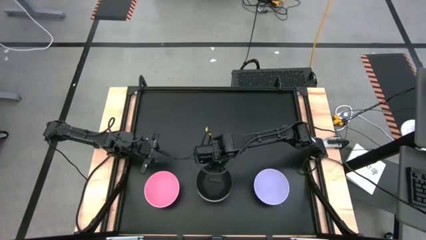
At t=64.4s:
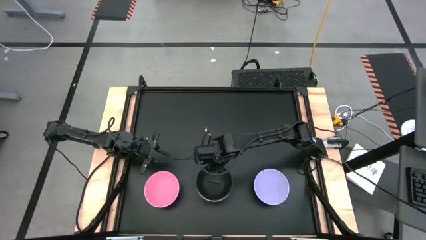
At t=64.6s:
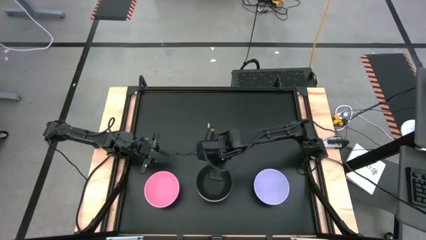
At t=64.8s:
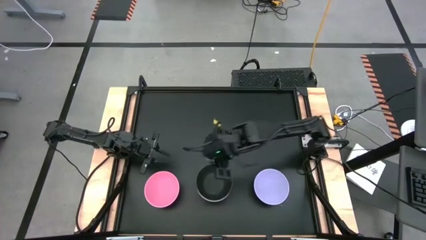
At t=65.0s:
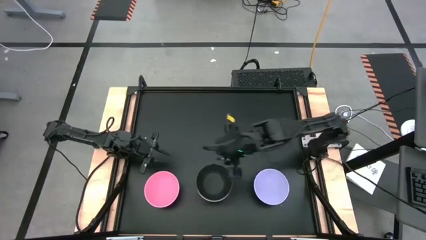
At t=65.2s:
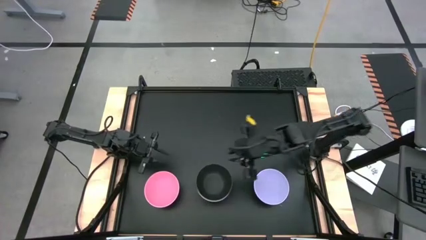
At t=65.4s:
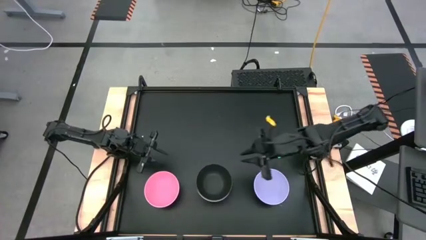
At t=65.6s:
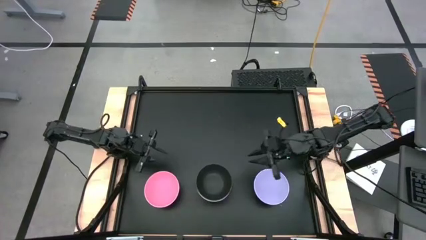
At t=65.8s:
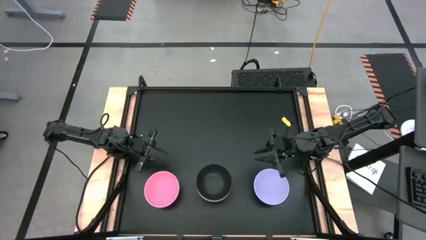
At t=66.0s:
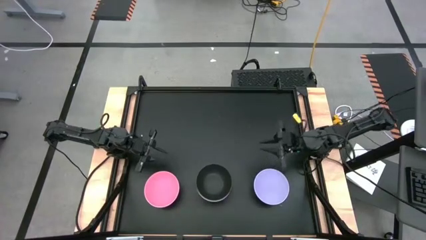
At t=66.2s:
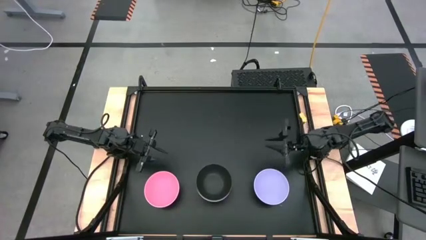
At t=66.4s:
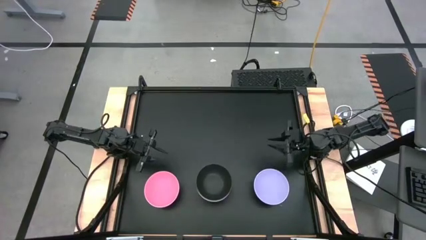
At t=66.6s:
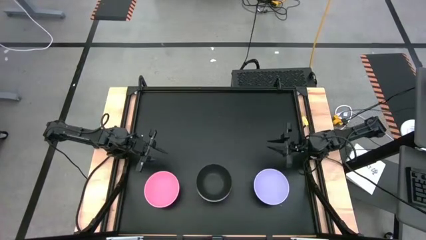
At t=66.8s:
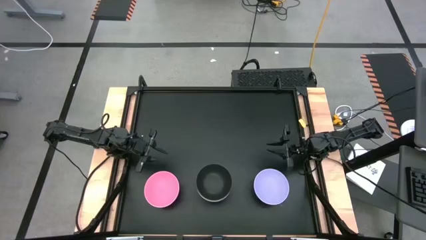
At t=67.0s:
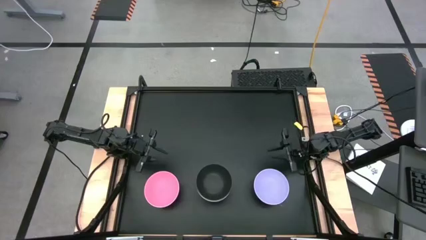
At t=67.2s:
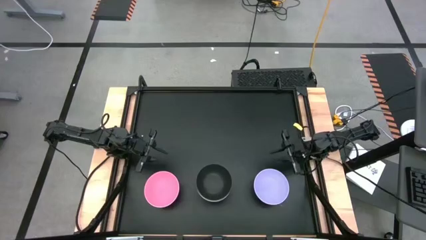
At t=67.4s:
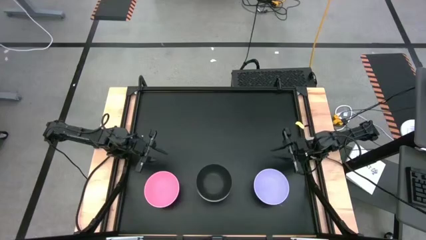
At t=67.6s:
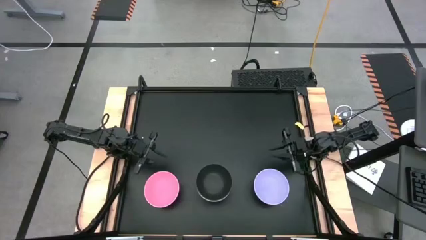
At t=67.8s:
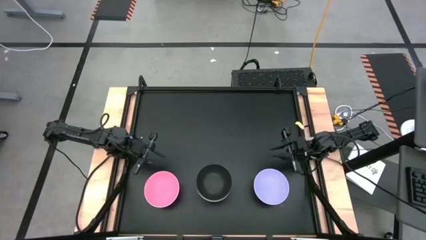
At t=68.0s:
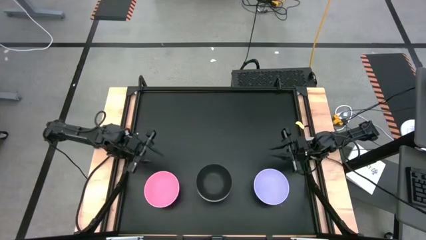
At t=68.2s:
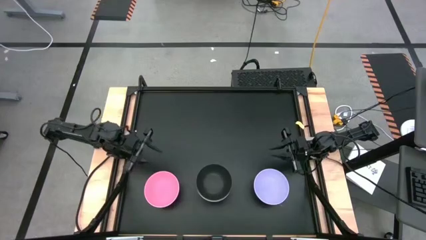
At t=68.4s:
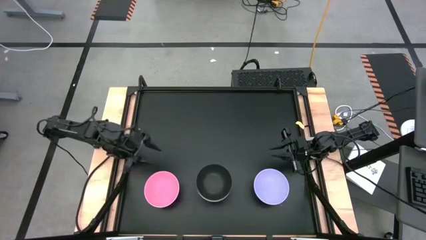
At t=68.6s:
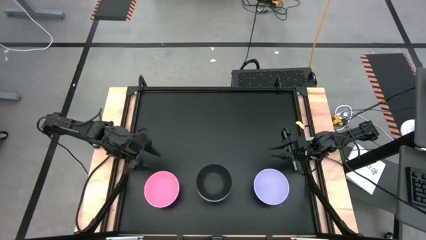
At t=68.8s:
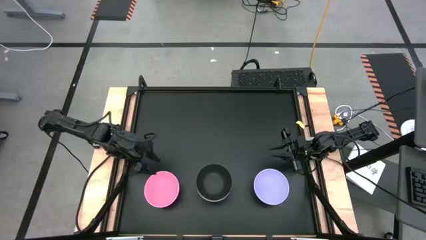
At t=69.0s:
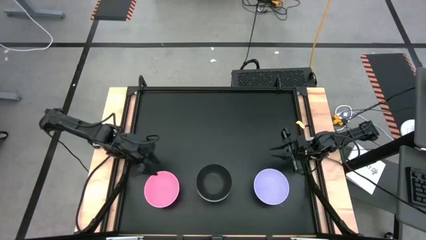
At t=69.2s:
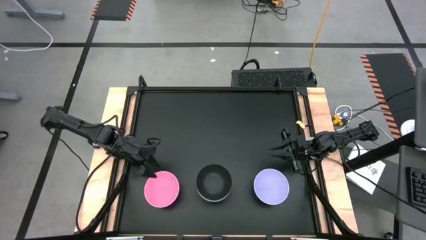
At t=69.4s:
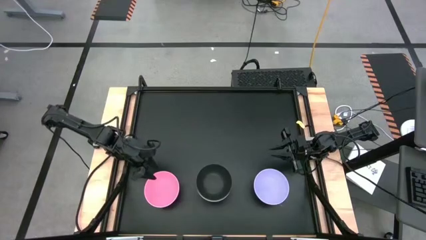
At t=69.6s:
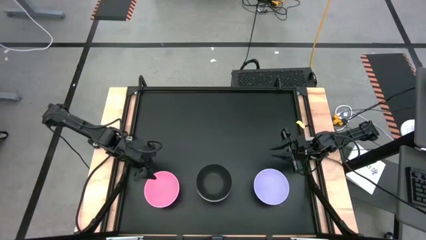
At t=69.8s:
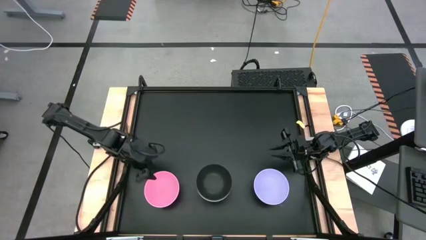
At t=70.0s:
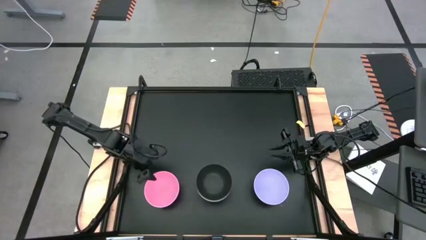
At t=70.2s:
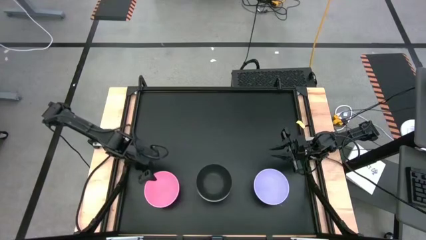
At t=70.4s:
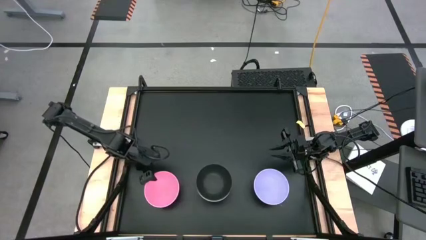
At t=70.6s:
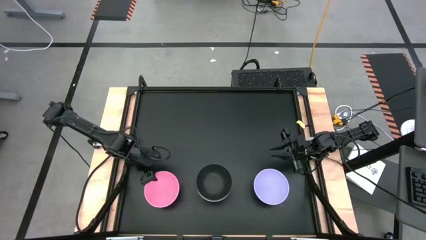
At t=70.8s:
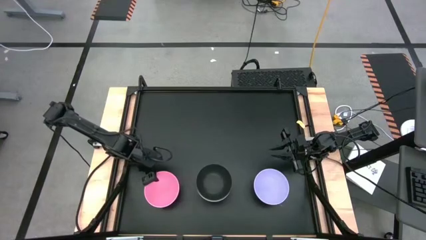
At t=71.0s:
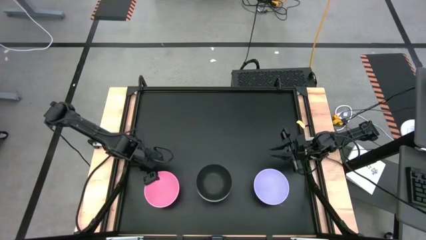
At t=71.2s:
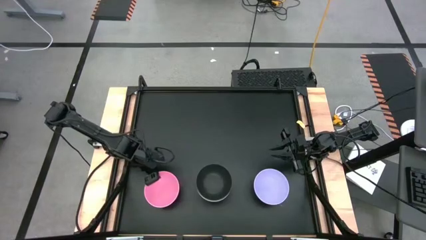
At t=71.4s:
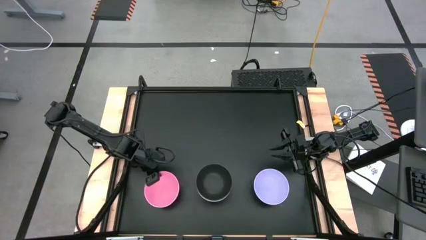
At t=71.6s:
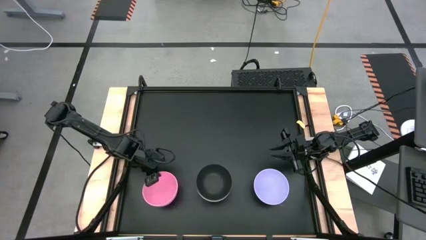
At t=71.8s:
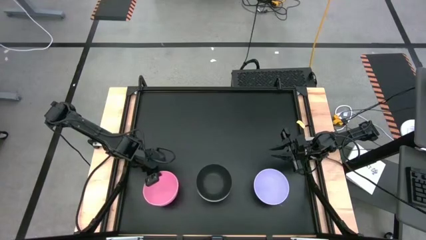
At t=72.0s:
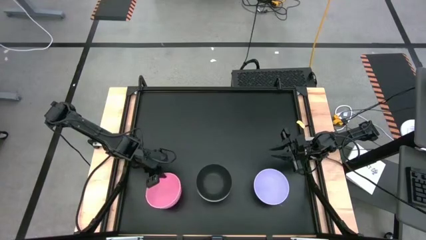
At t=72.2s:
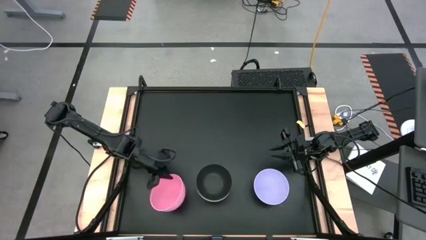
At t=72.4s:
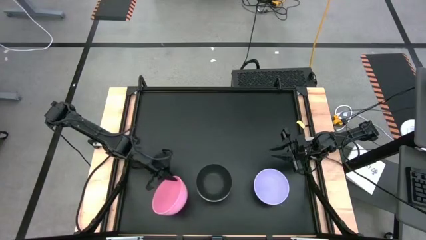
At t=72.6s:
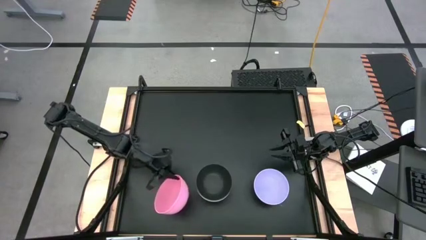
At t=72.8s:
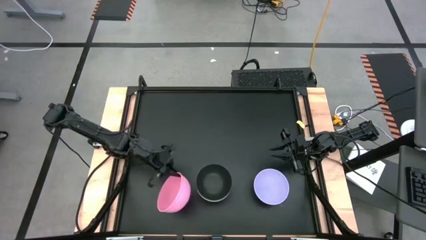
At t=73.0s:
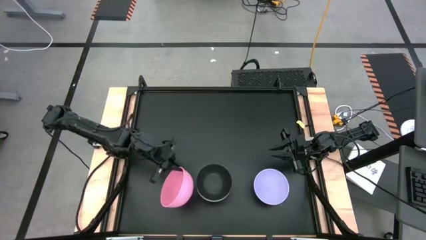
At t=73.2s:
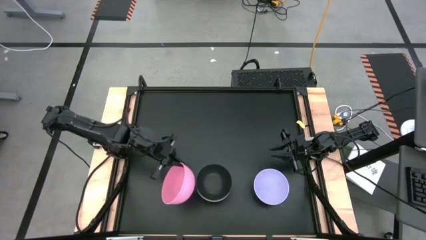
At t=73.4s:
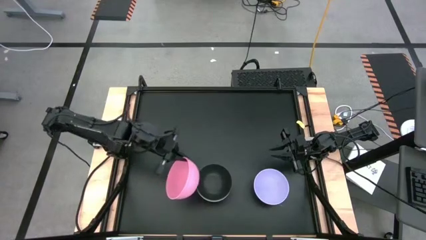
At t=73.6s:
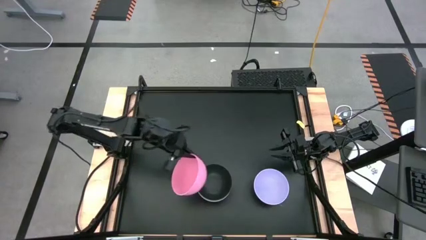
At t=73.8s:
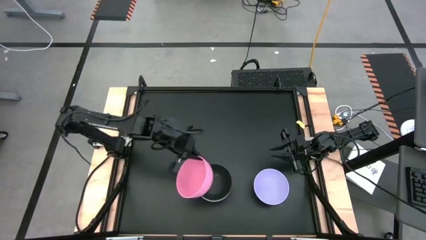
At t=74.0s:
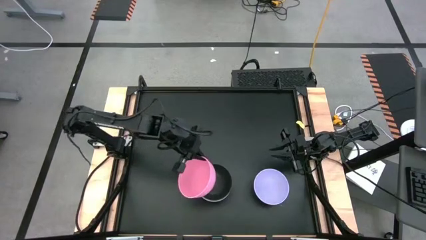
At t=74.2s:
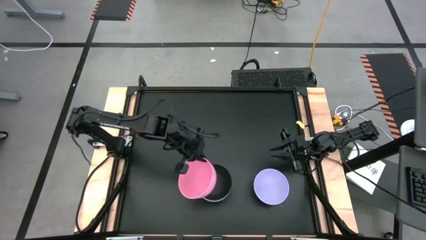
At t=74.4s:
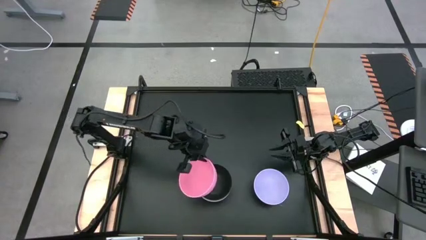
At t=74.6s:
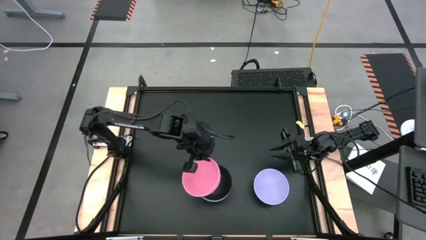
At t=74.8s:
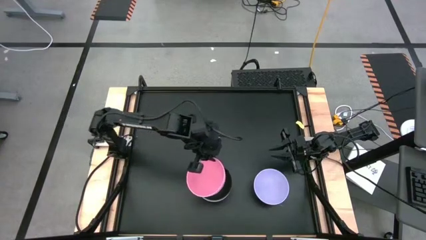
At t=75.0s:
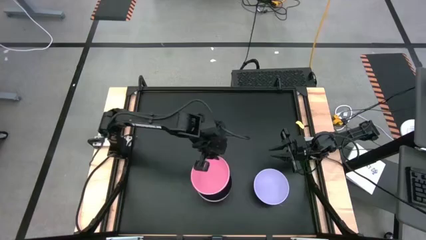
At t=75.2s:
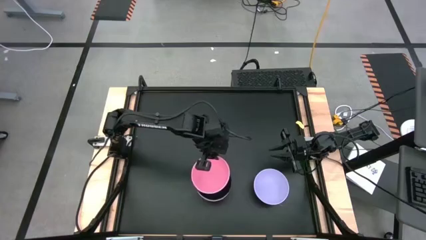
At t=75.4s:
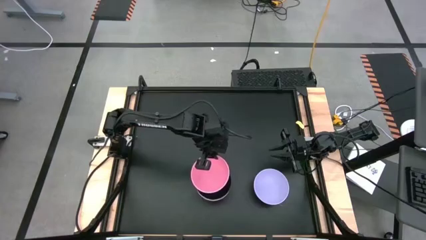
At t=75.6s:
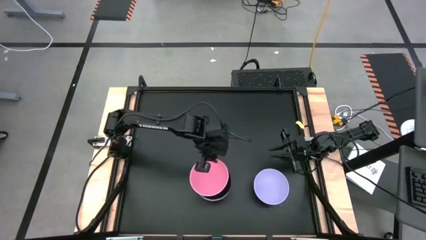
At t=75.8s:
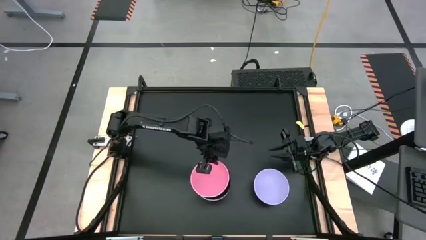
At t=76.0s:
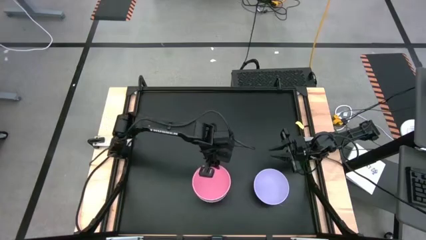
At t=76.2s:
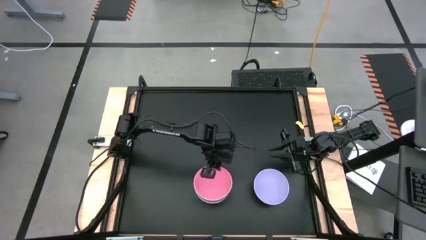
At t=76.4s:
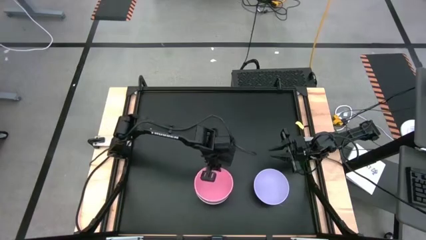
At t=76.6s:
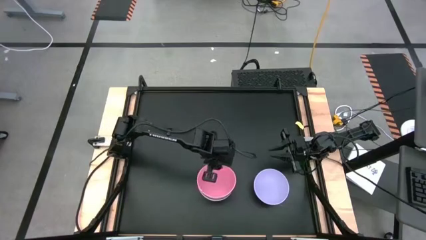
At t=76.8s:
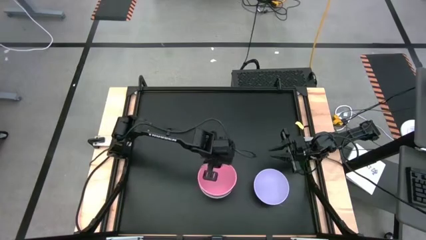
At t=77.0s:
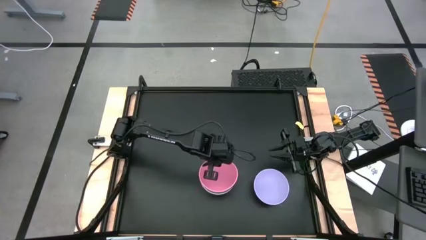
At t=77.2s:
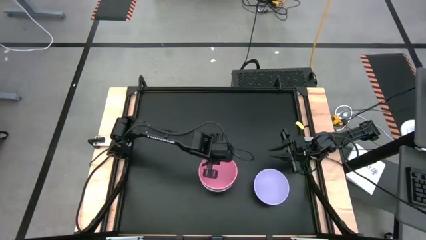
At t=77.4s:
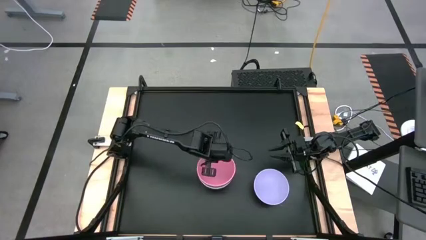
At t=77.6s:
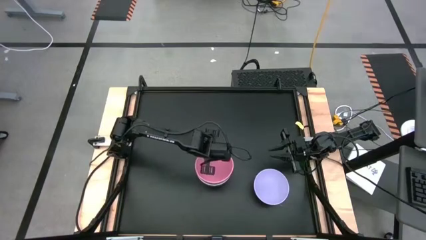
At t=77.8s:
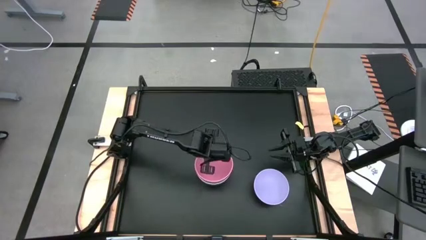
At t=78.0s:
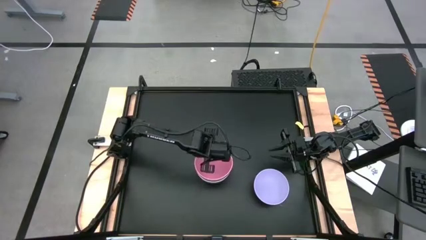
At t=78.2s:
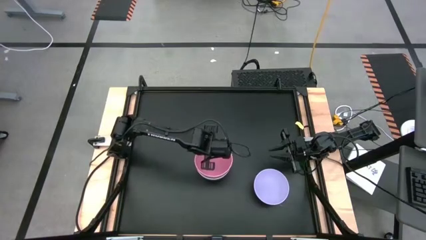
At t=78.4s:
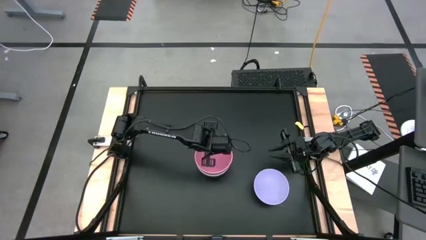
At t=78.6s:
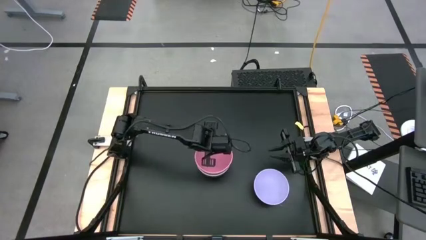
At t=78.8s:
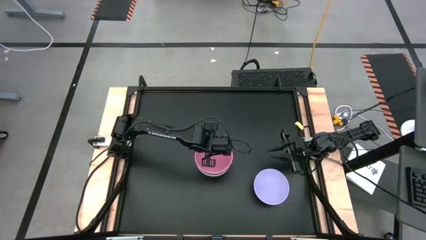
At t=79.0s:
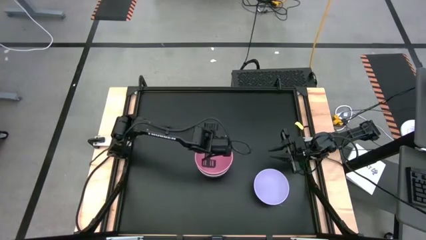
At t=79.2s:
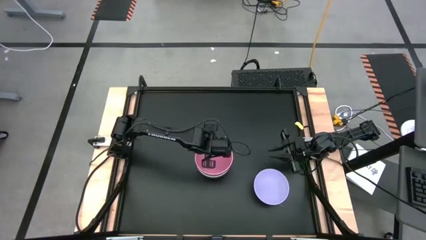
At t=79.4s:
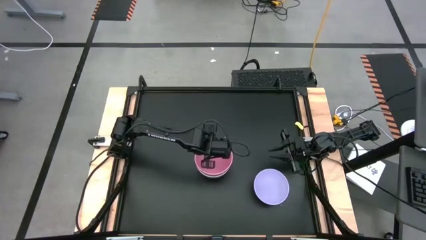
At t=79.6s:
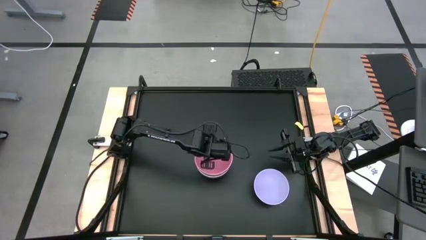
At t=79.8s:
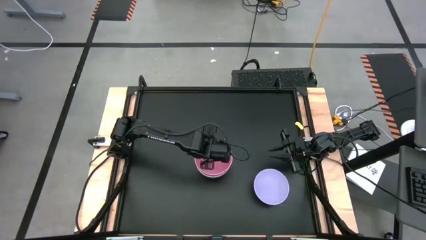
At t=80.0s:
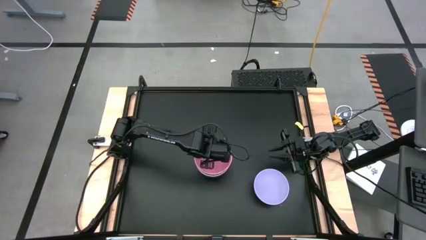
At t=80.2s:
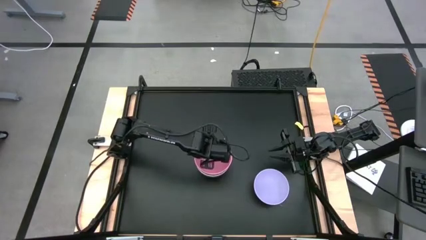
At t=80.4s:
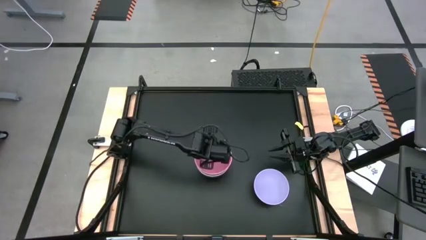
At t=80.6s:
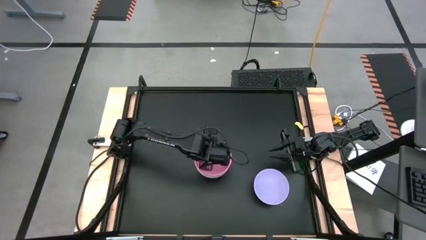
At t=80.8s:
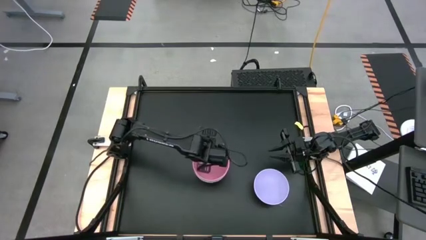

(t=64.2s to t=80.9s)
Task: Nest bowls inside each other
Stack the pink bowl on top of the stacked black bowl
